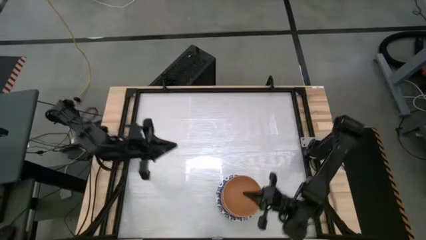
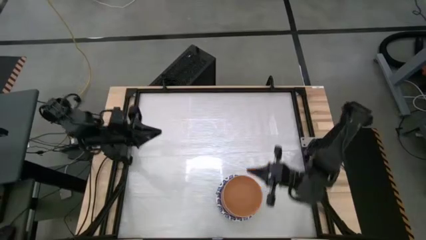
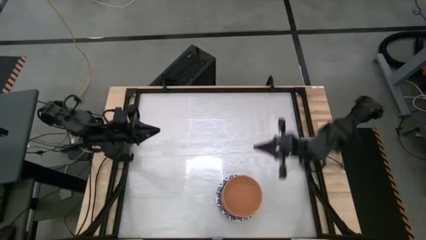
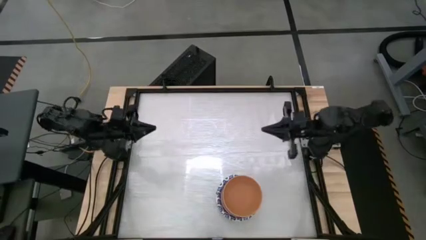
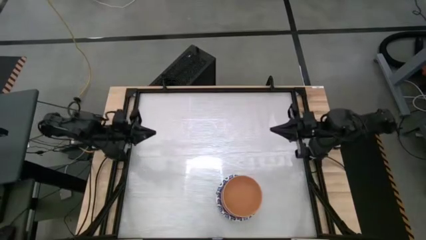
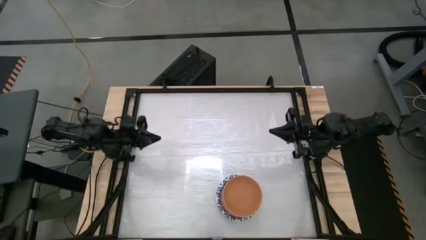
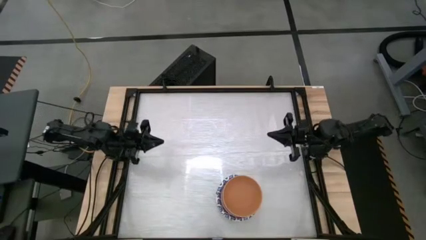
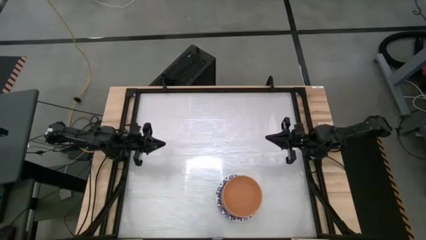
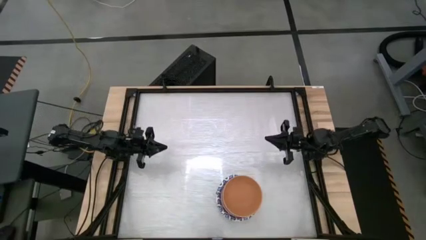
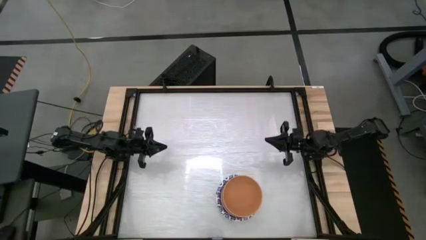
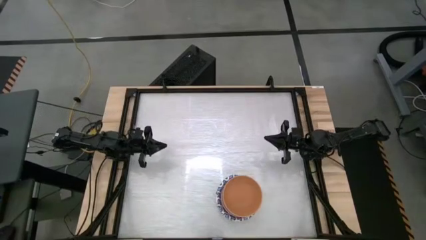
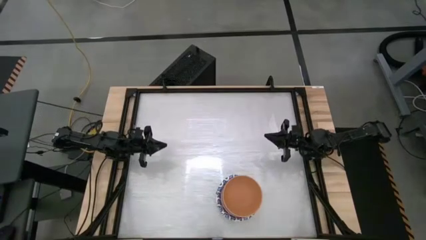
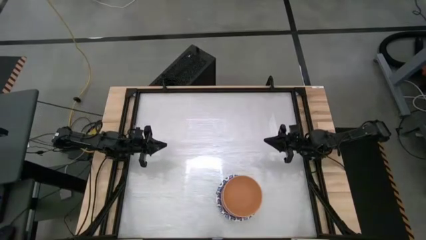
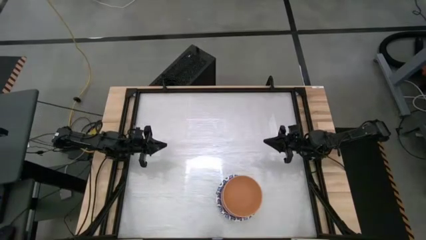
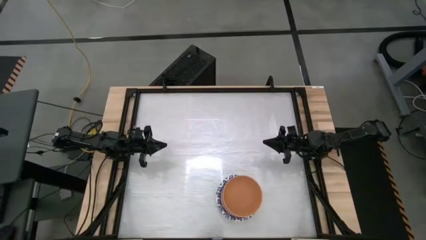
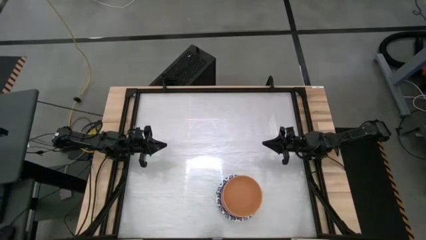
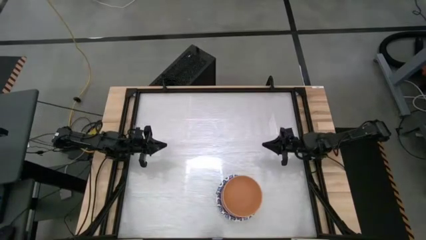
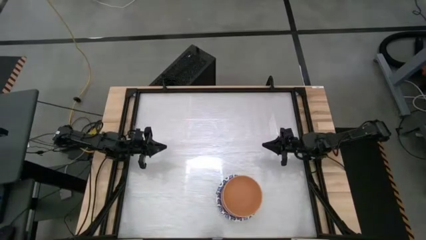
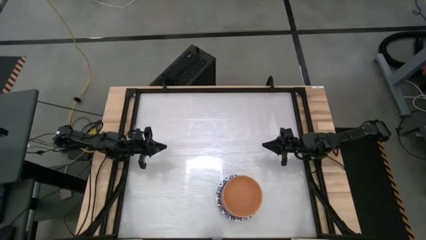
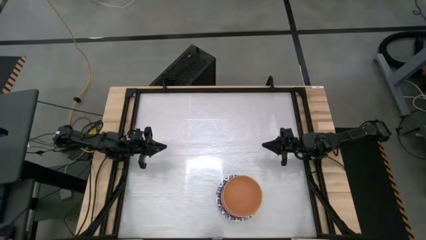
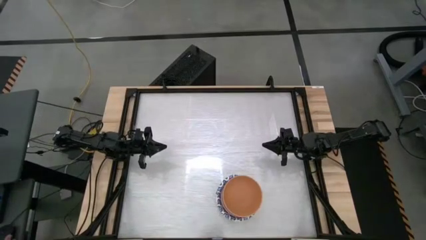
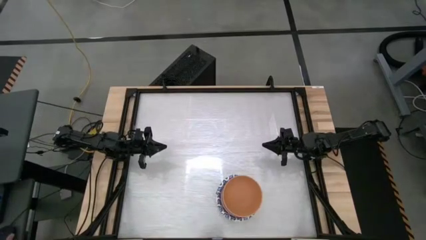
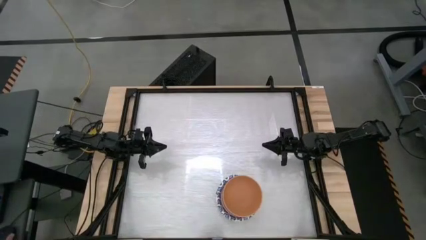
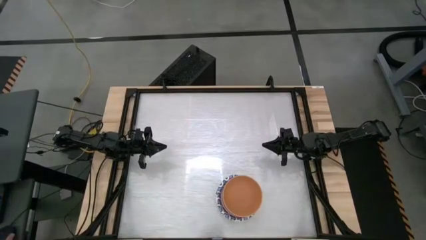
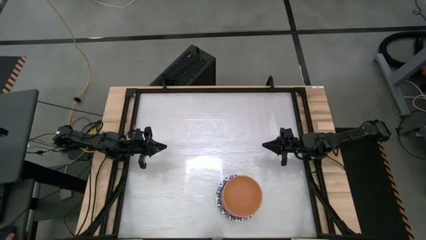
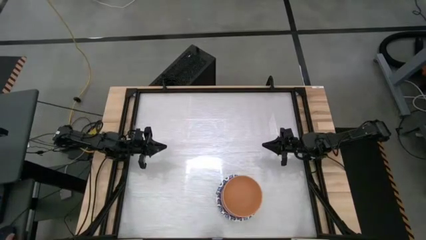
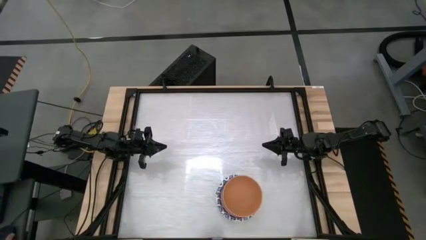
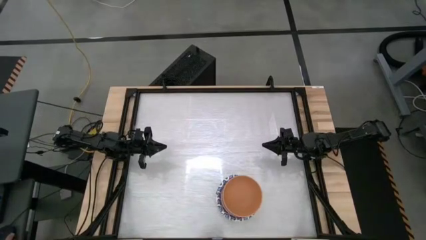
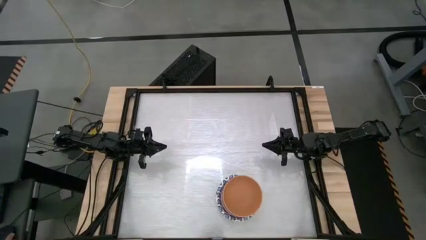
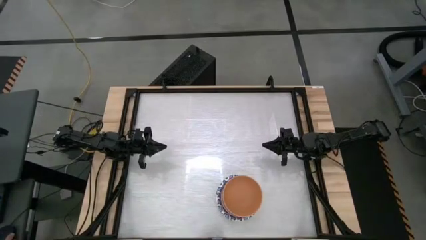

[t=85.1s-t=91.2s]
Return to Home Position
